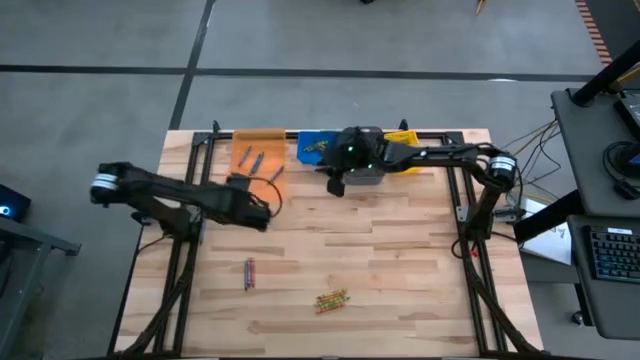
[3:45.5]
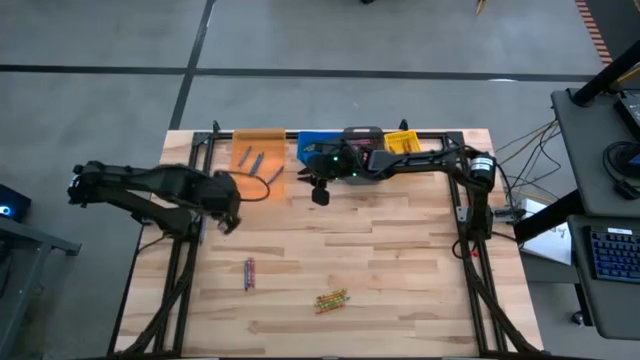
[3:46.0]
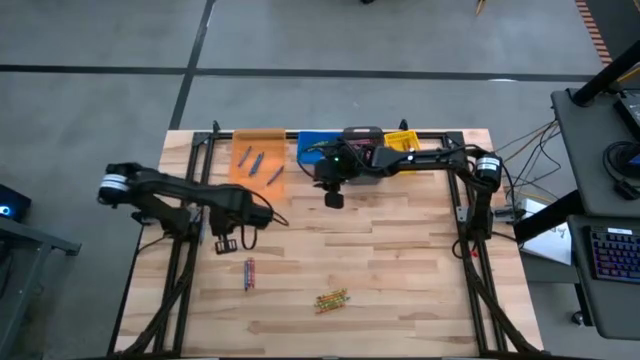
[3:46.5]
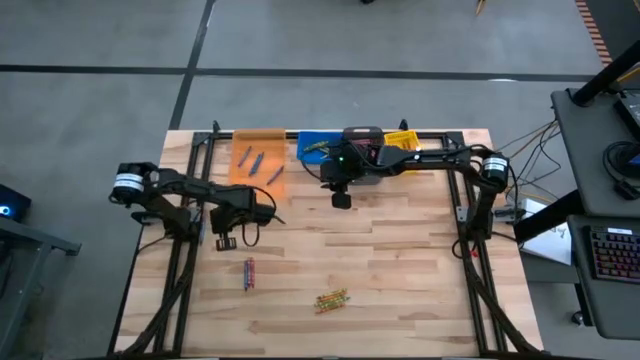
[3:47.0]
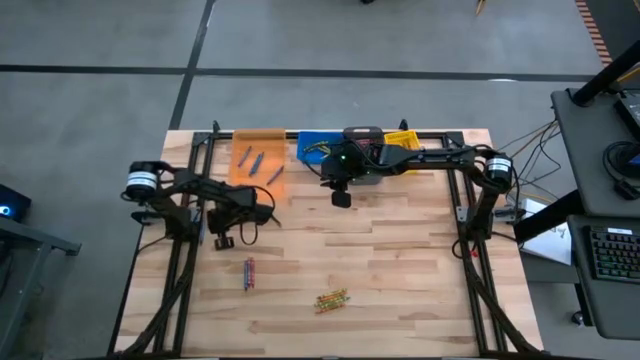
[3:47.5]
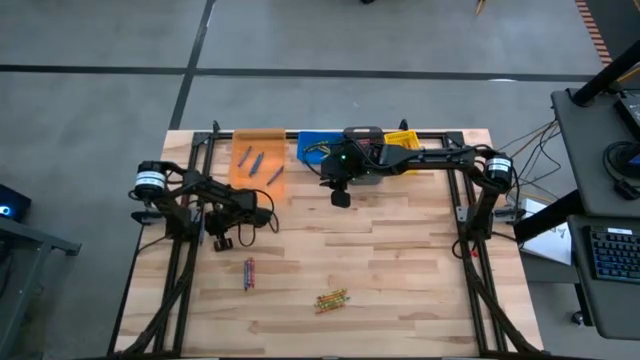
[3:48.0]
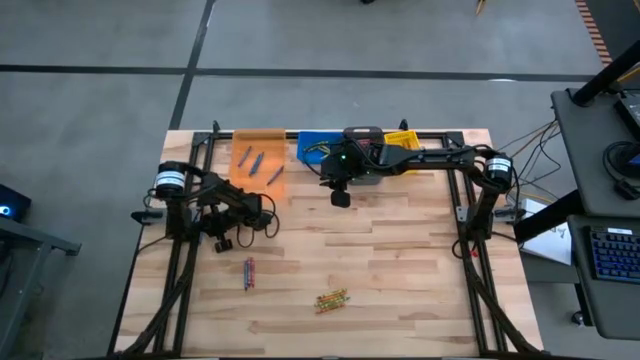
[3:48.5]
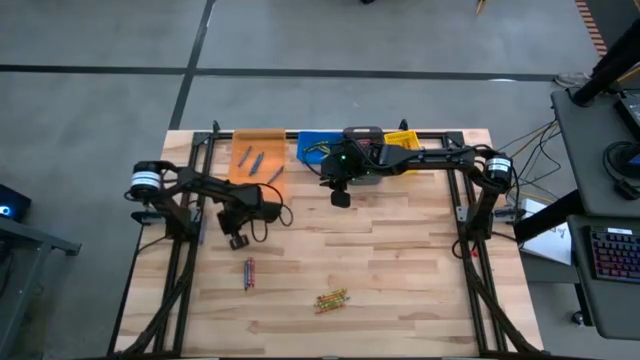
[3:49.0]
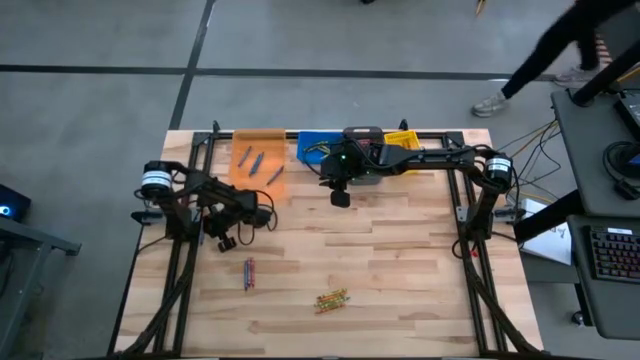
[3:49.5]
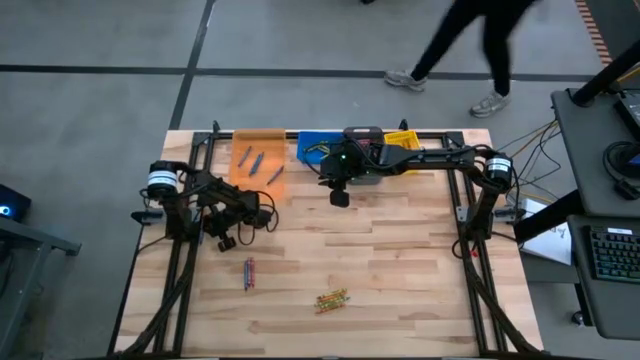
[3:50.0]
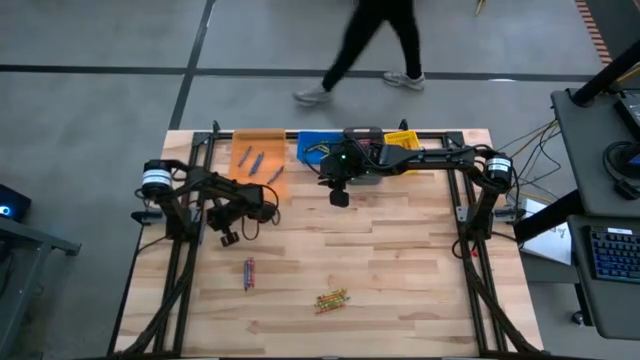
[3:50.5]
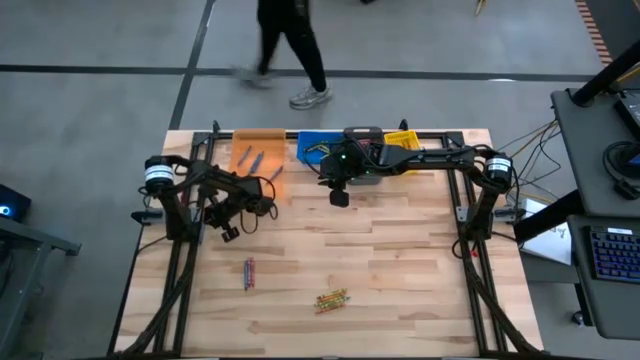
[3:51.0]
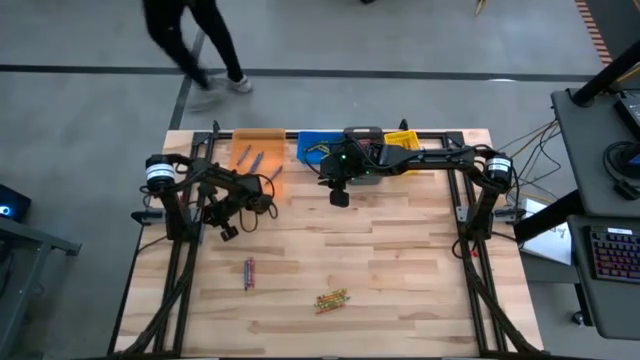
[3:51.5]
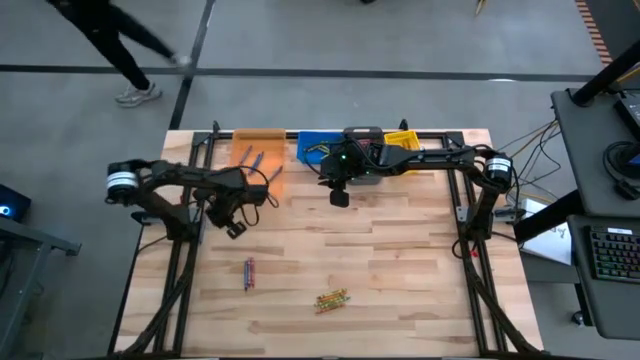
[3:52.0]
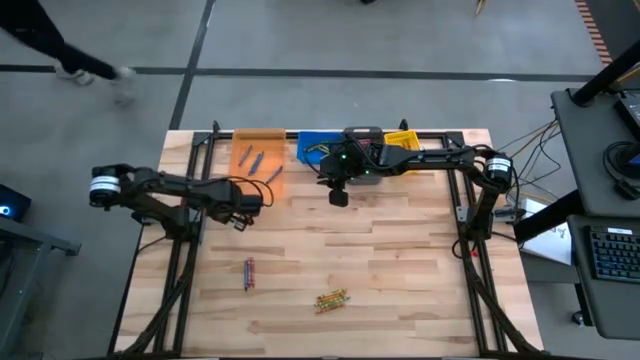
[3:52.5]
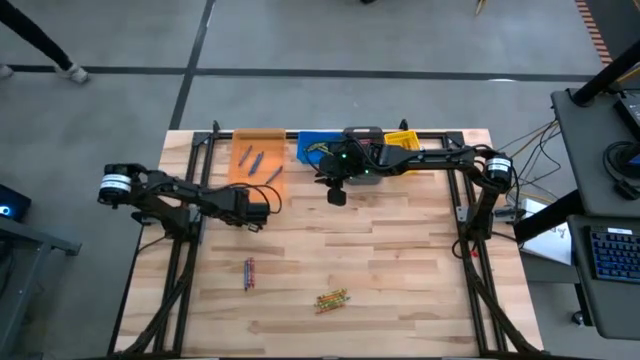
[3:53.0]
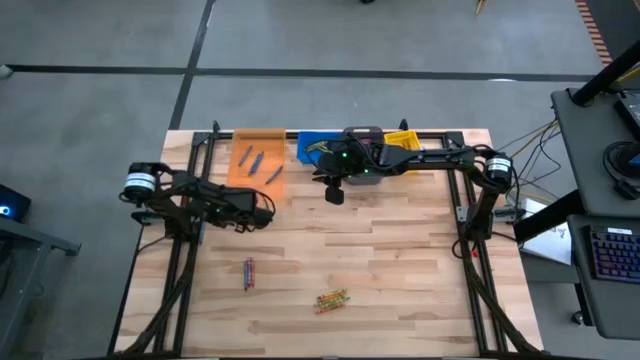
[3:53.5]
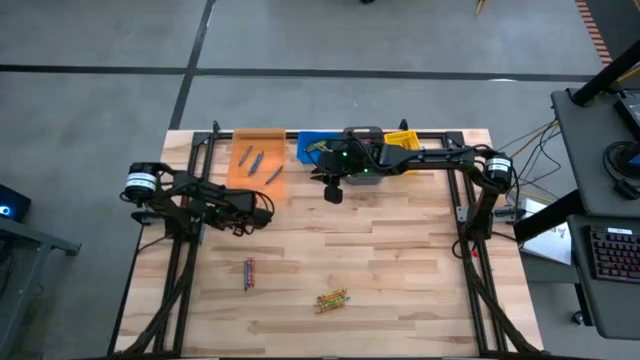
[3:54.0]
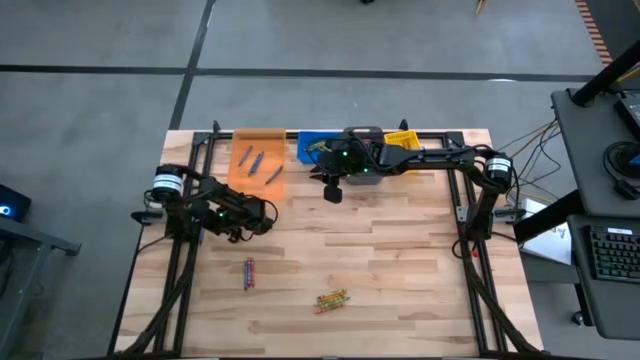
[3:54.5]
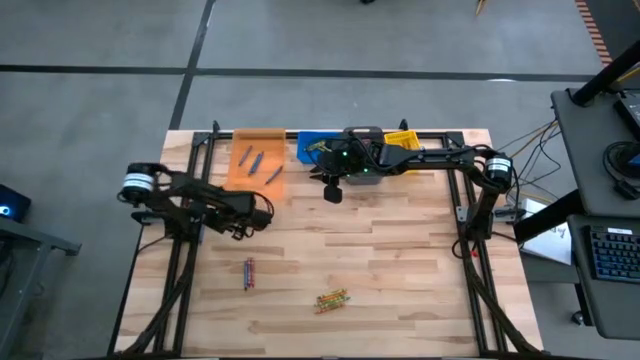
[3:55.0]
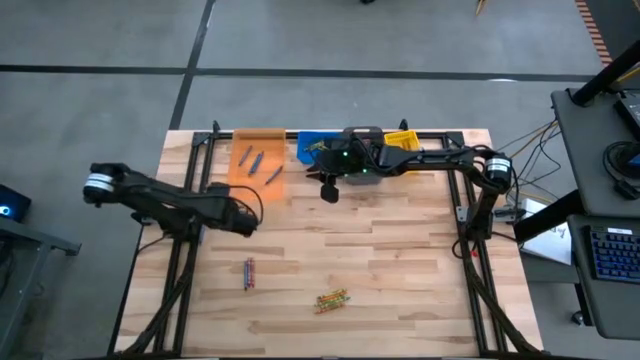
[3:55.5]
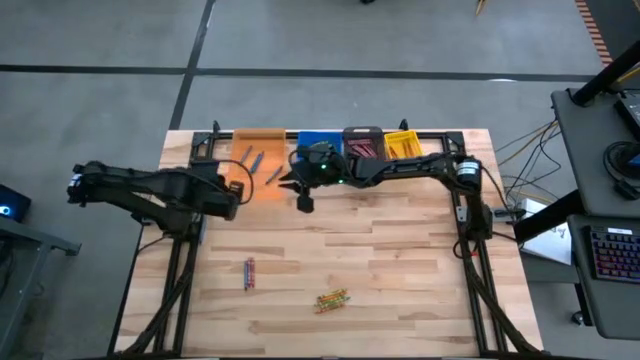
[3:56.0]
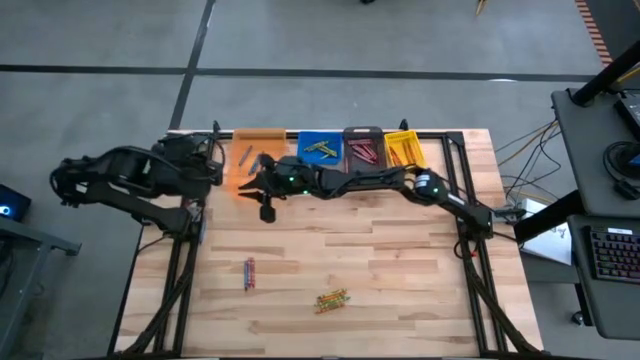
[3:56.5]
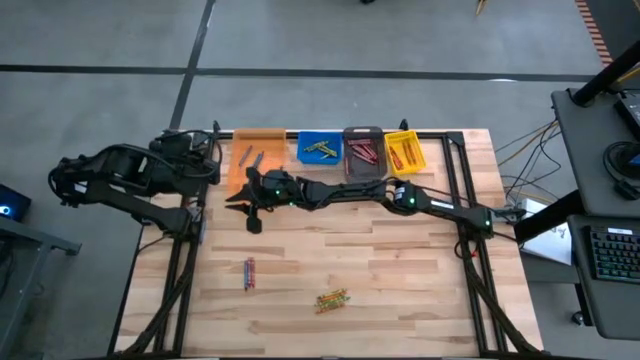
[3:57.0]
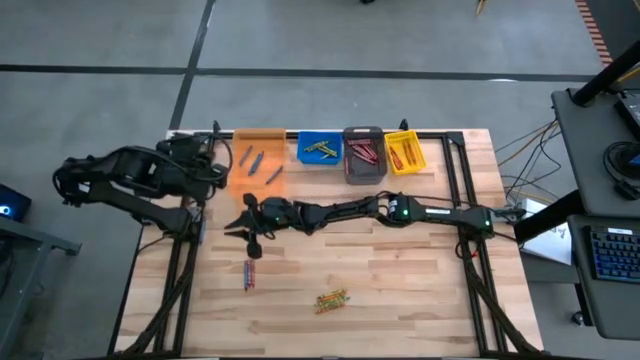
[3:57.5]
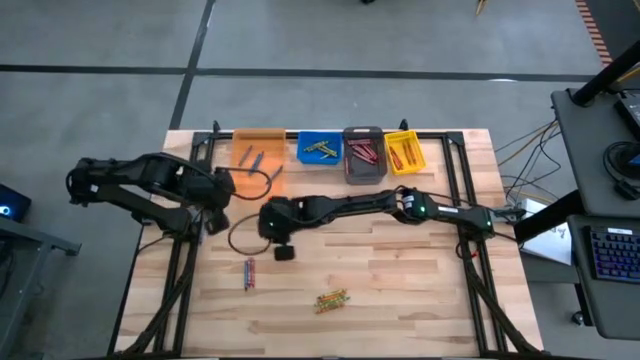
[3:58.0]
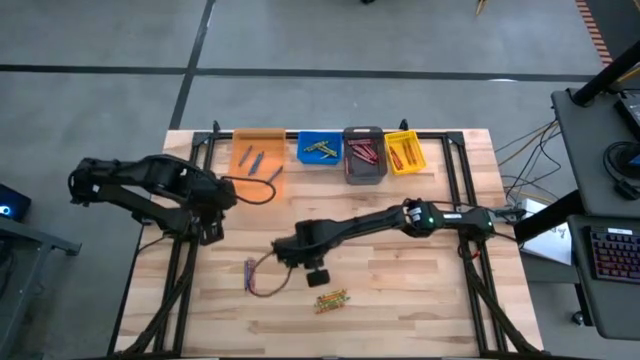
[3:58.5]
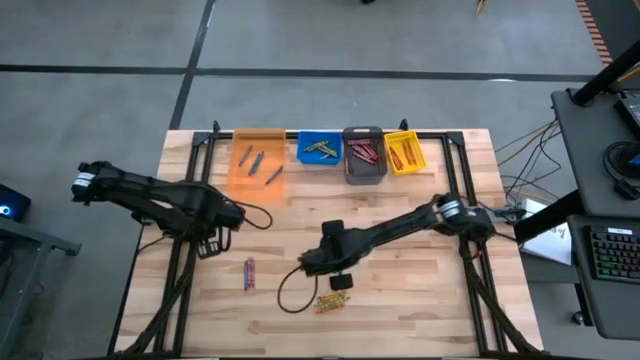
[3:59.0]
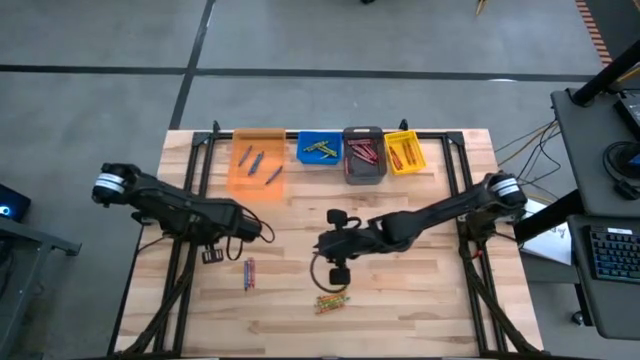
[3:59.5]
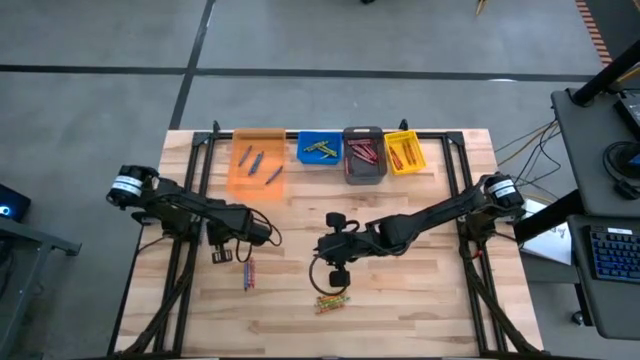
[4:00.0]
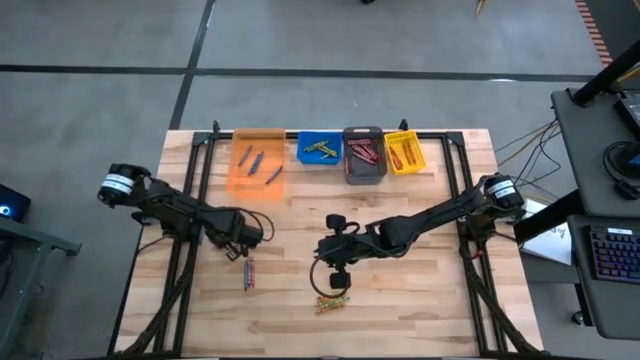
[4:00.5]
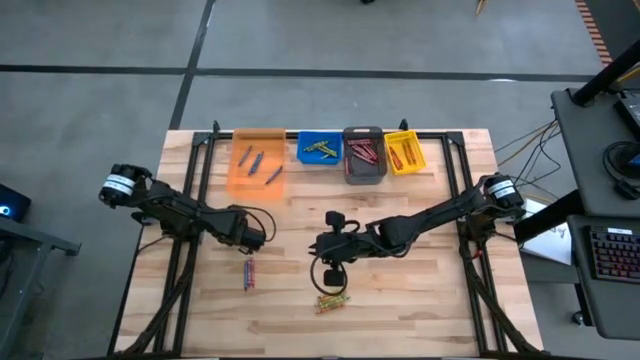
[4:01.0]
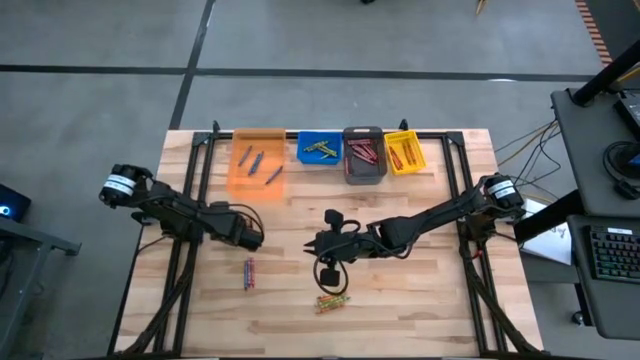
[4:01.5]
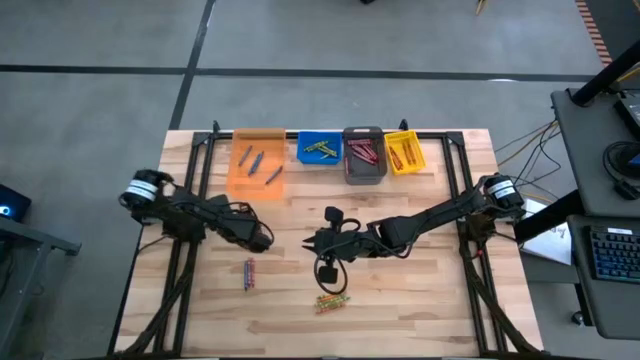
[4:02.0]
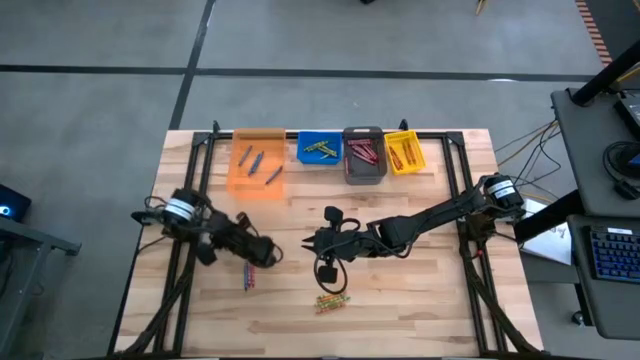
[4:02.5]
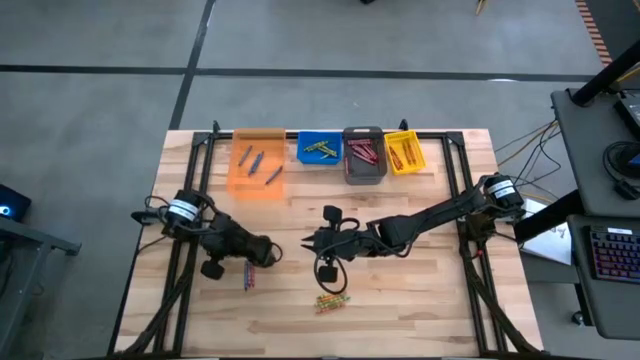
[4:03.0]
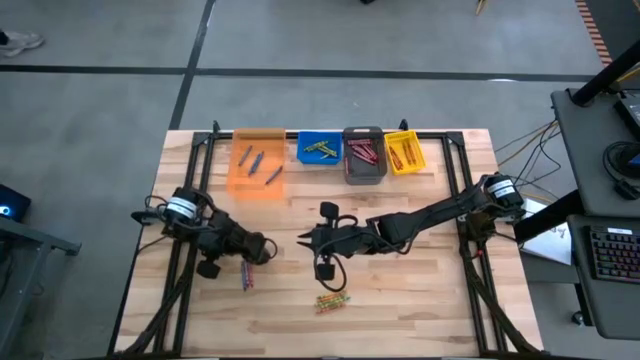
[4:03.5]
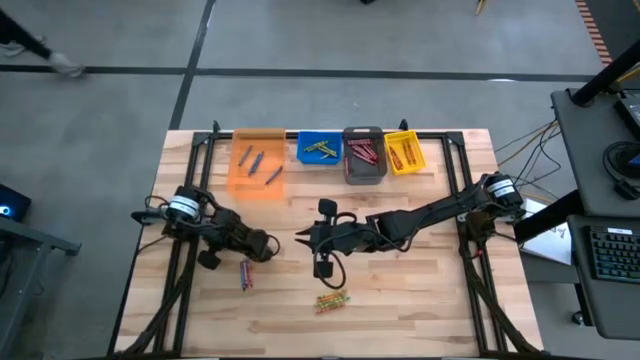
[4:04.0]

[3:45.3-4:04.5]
Task: Sort crayons
Put the blue crayon into the orange bin

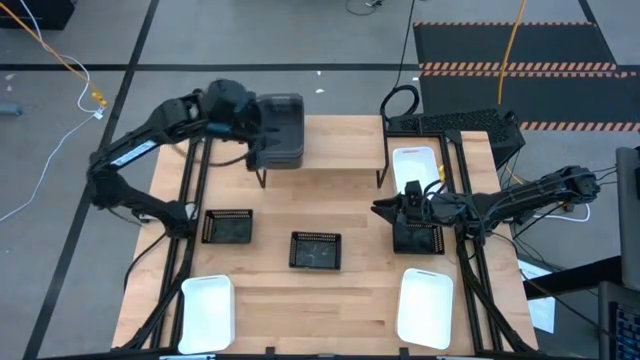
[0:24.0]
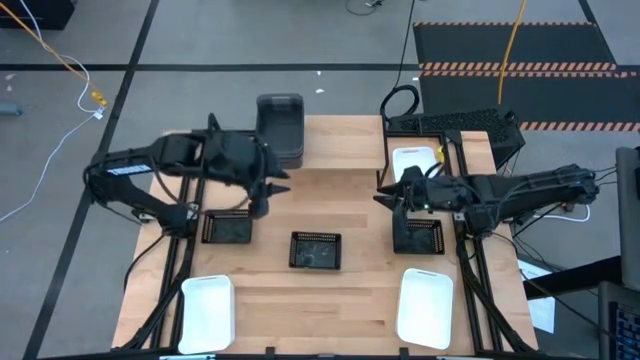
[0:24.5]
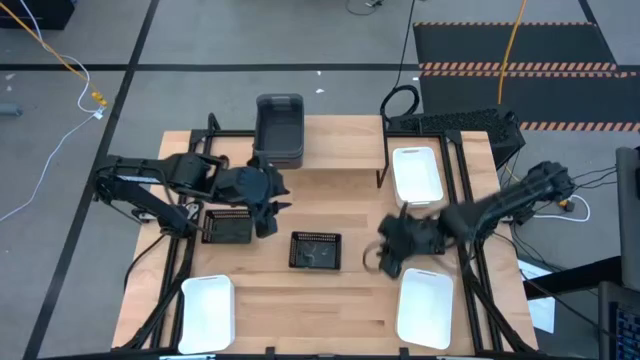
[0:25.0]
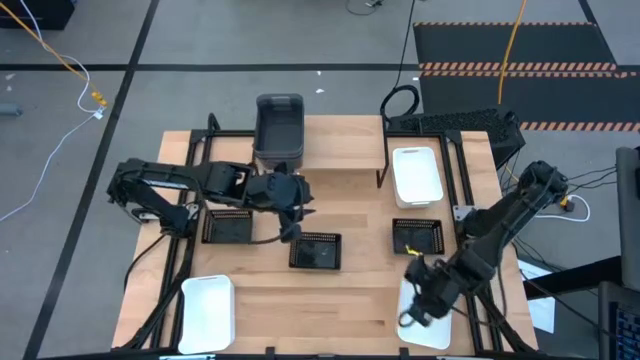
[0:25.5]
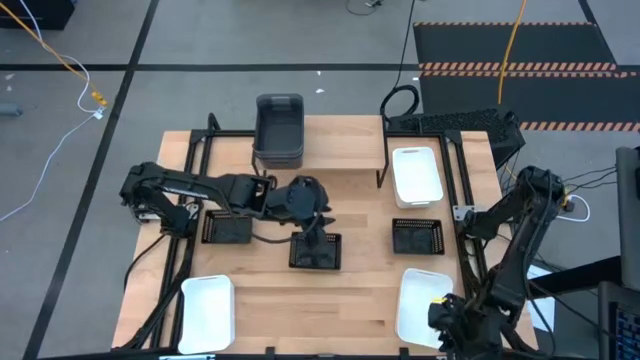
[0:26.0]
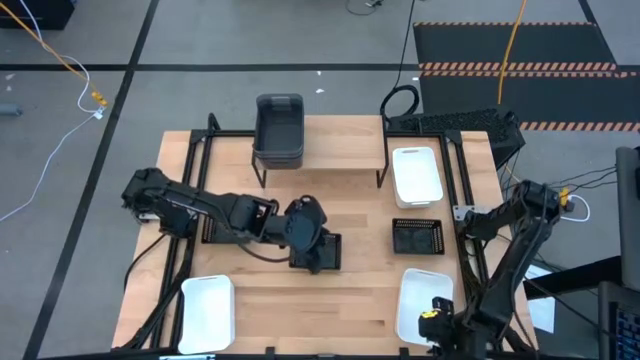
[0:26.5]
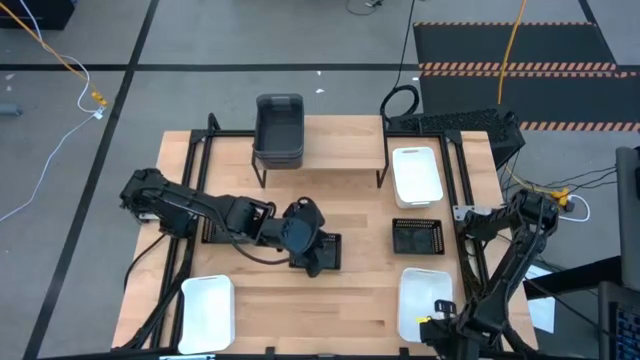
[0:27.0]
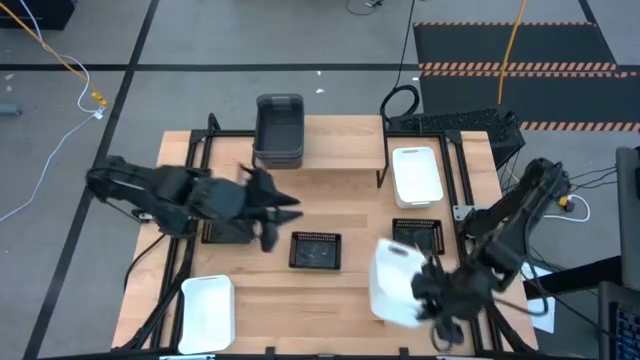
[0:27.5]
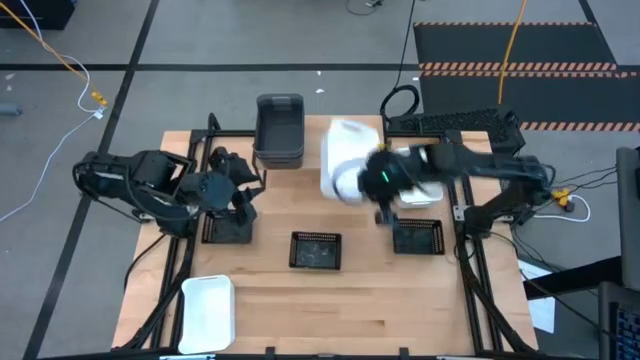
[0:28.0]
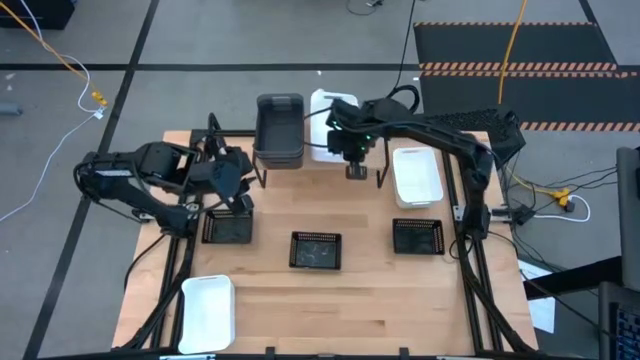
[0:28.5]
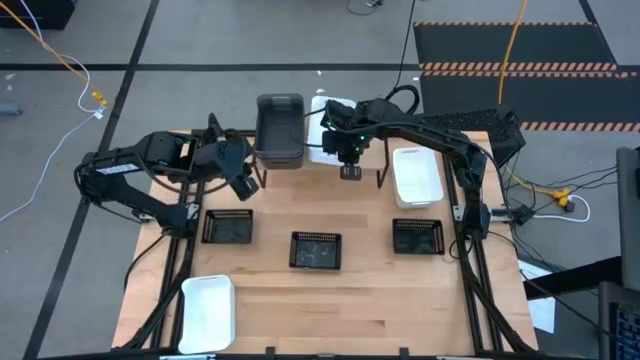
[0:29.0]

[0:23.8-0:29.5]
Task: Stack baskets on shelf by color
Put the bottom right white bin on the shelf
